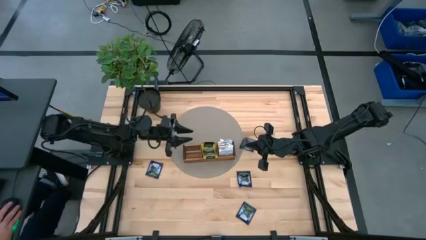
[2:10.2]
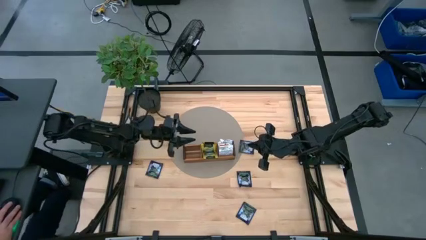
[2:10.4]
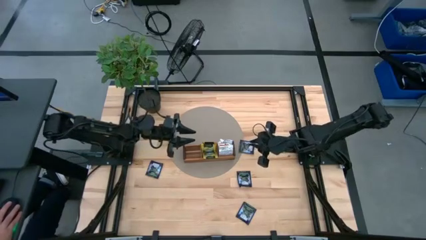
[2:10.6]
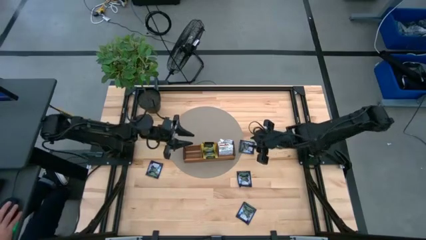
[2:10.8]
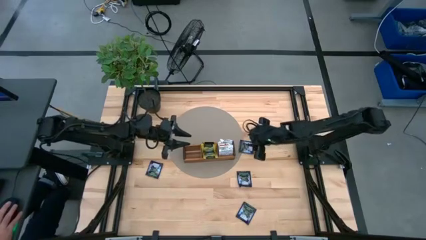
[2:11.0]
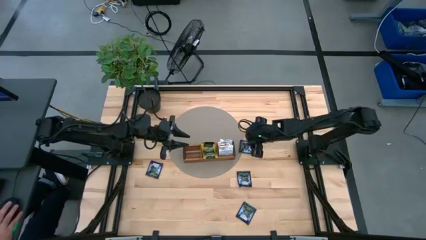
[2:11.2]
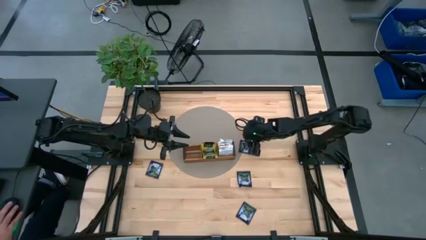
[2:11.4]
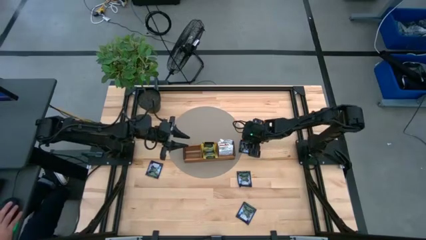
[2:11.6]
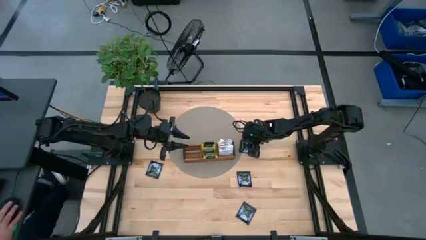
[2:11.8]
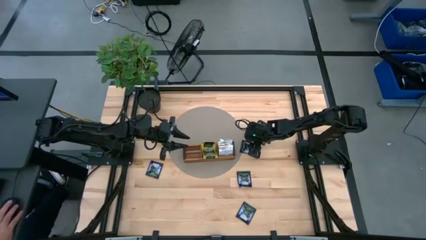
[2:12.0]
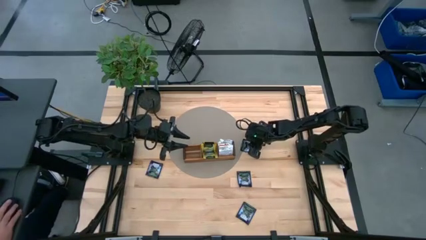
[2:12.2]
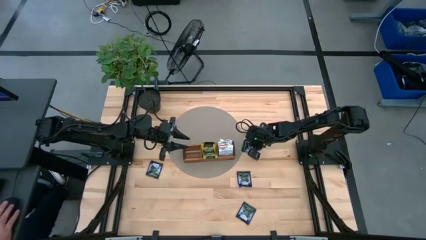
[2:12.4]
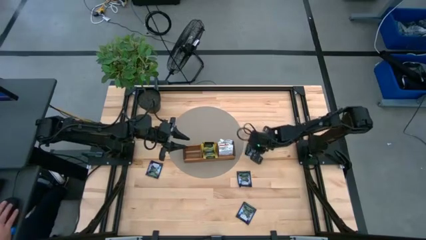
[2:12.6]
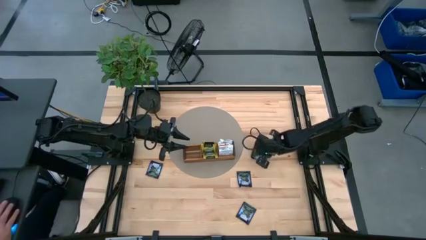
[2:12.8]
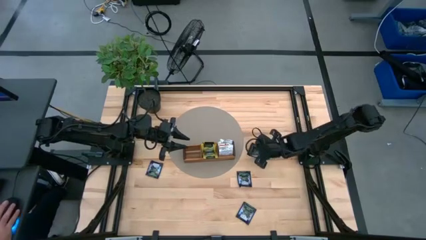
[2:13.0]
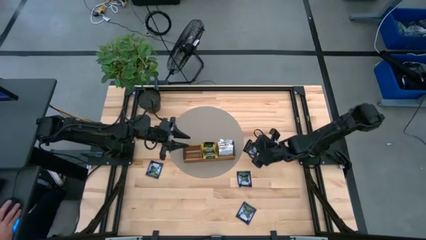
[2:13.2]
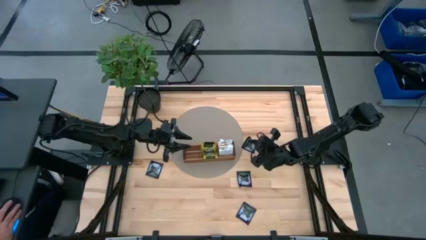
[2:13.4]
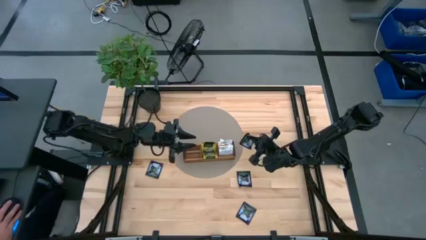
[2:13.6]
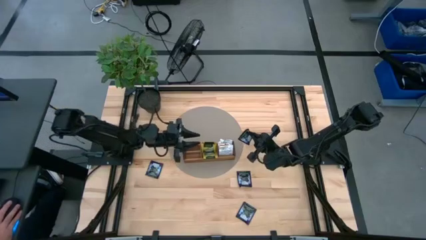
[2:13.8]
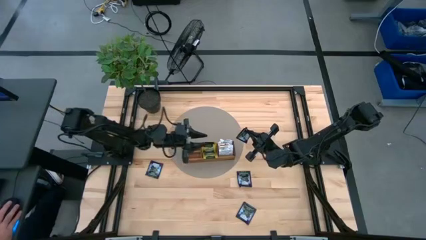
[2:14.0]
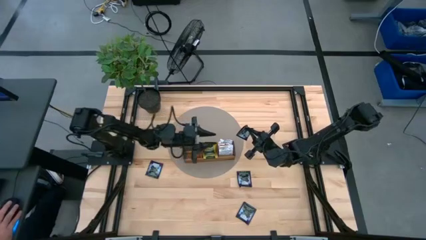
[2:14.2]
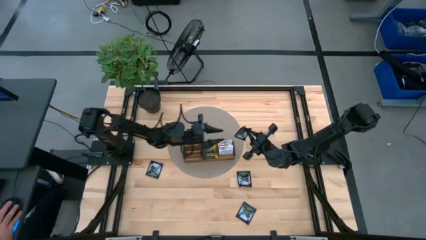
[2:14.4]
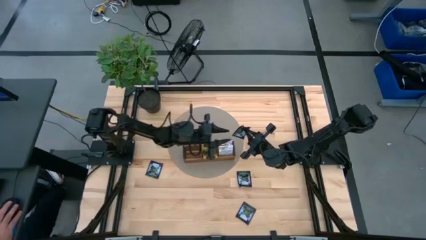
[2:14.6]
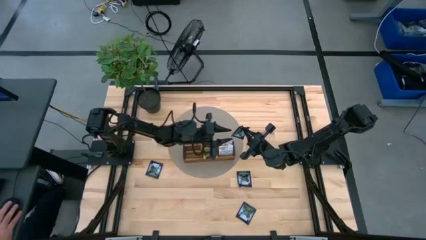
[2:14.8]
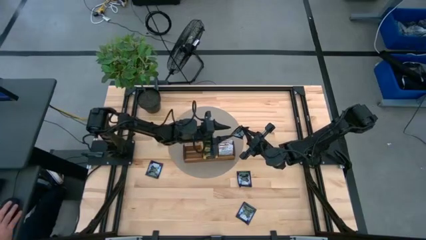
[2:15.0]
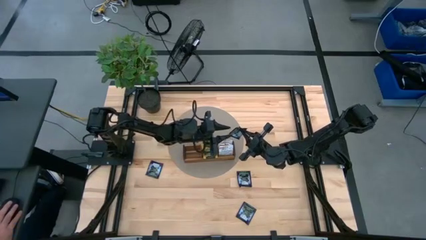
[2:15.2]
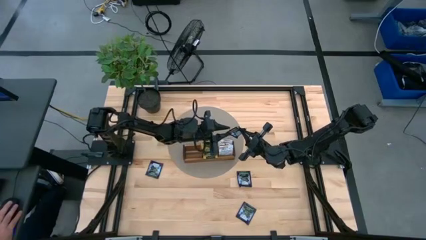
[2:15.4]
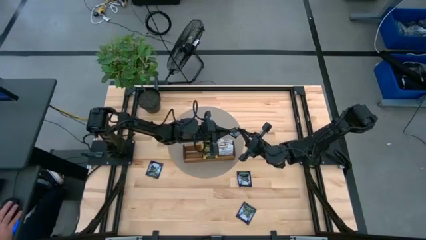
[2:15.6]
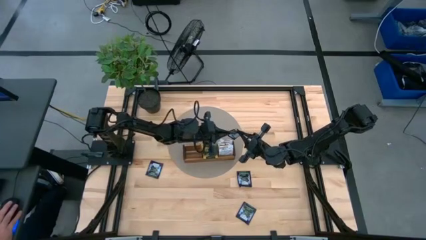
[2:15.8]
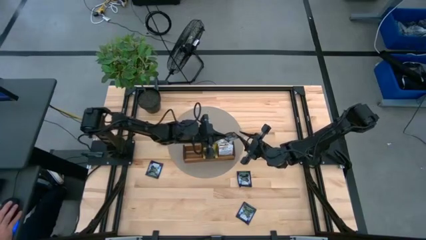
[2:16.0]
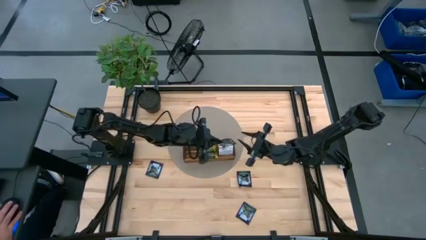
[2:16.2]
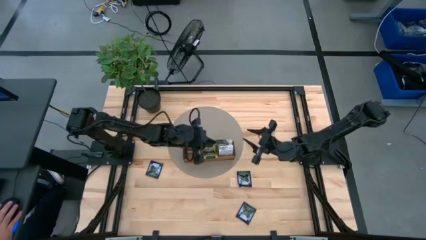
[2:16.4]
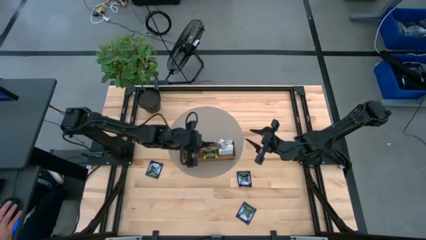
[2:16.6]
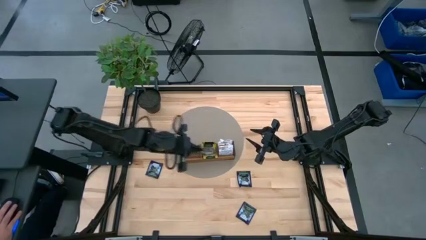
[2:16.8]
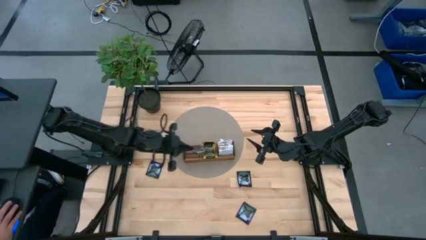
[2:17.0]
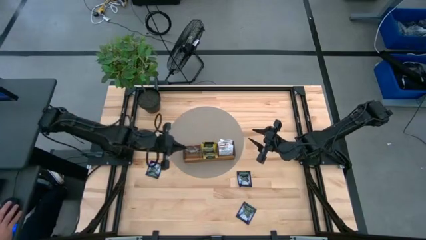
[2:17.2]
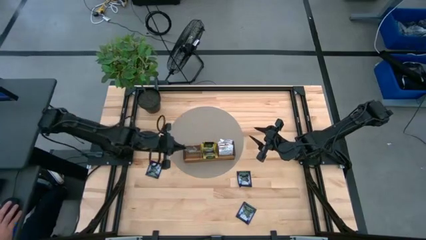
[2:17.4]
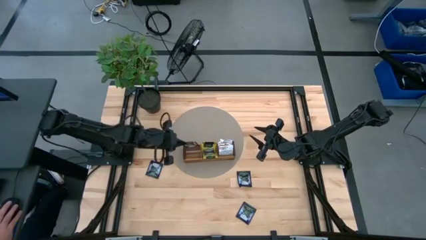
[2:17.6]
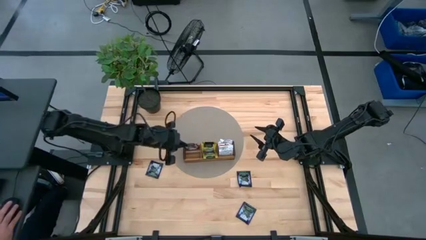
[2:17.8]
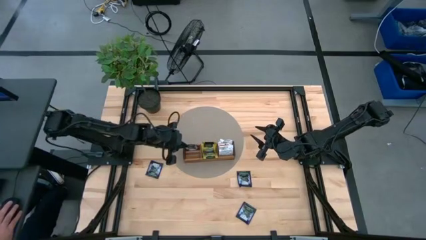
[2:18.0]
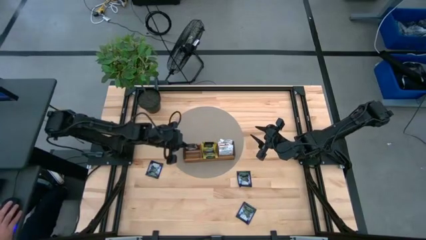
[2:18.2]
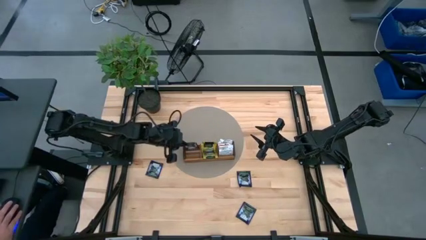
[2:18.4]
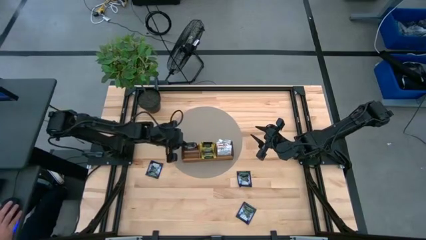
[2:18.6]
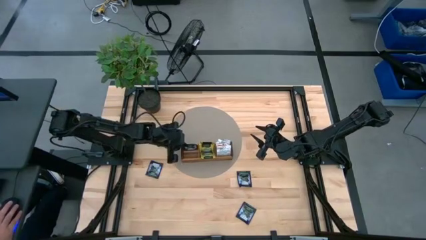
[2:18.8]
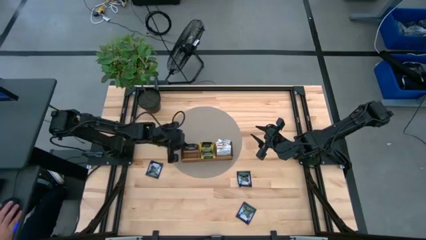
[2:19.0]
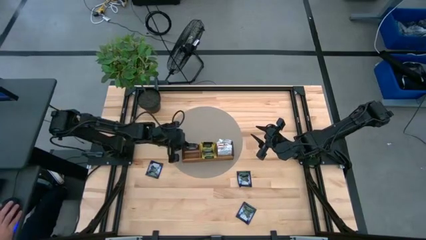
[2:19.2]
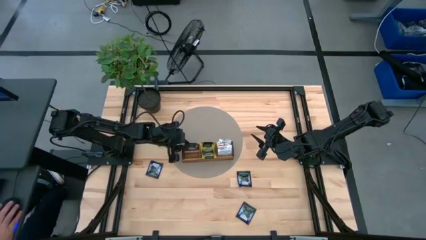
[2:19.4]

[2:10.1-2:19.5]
Task: Pick & Place Tea
Put the purple tea bag into the left section of the wooden organizer

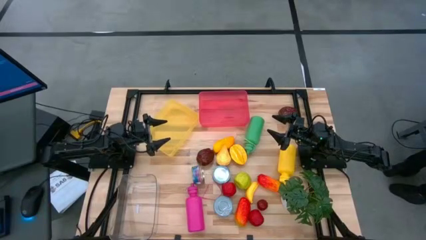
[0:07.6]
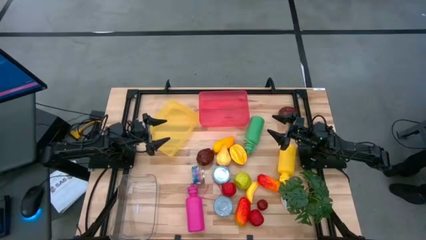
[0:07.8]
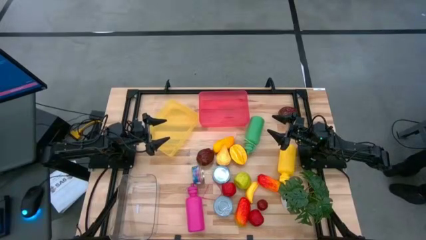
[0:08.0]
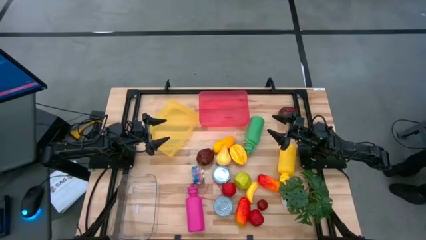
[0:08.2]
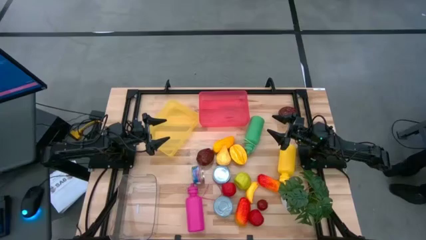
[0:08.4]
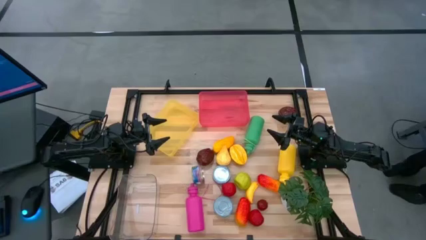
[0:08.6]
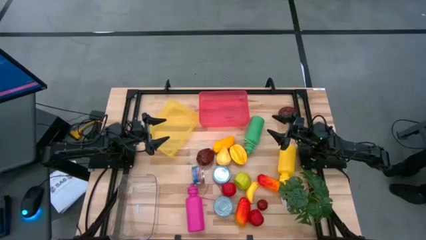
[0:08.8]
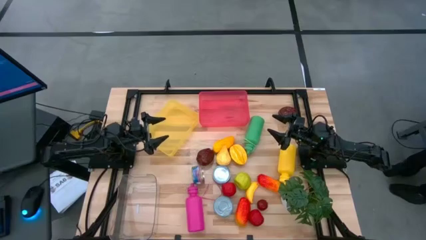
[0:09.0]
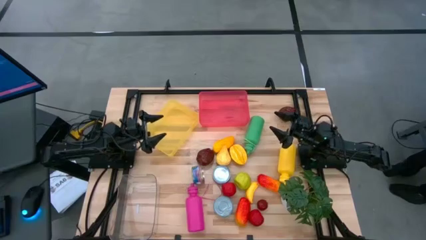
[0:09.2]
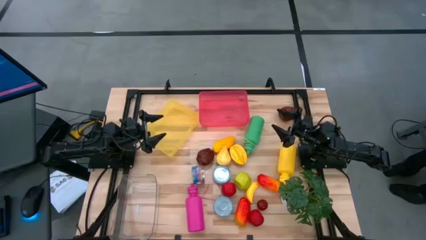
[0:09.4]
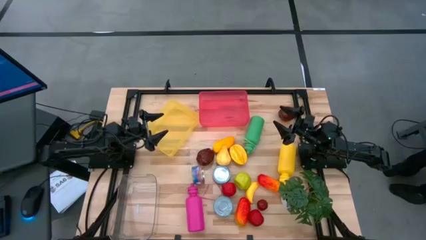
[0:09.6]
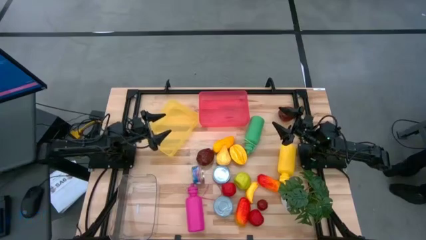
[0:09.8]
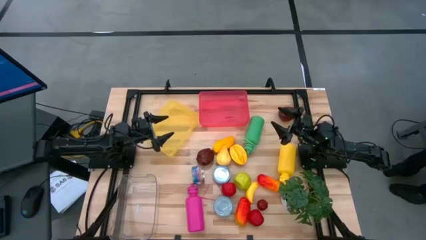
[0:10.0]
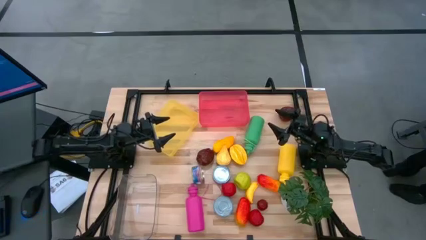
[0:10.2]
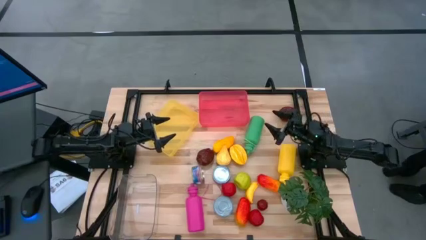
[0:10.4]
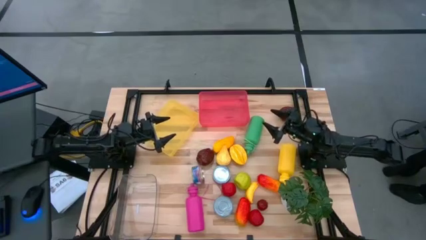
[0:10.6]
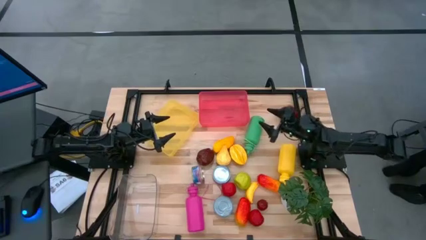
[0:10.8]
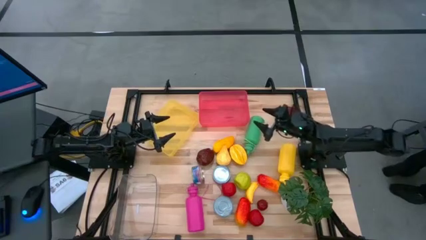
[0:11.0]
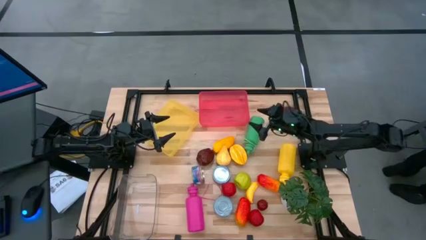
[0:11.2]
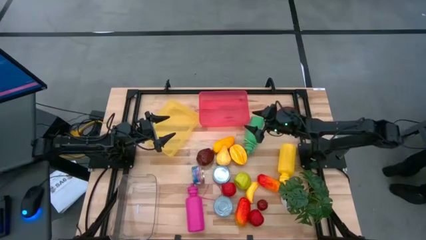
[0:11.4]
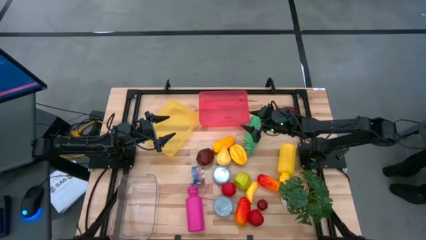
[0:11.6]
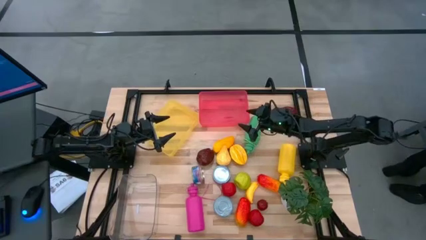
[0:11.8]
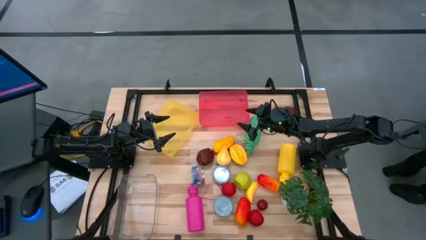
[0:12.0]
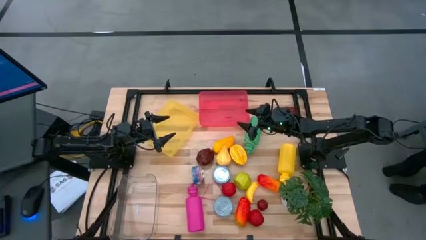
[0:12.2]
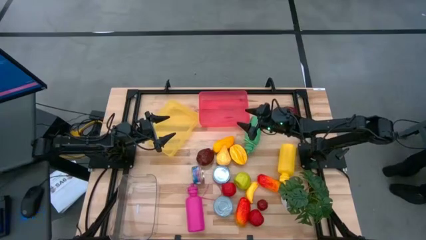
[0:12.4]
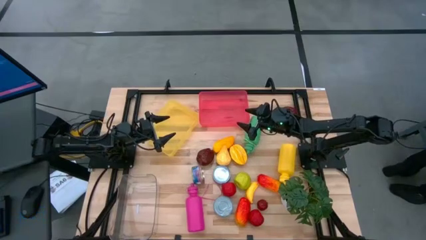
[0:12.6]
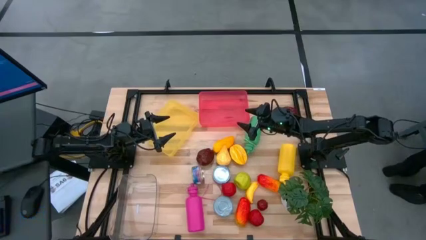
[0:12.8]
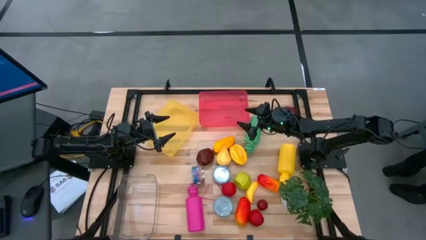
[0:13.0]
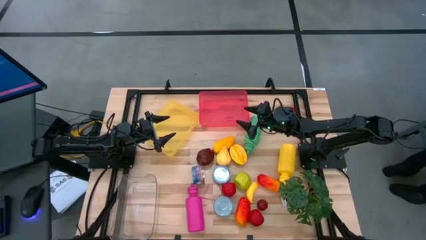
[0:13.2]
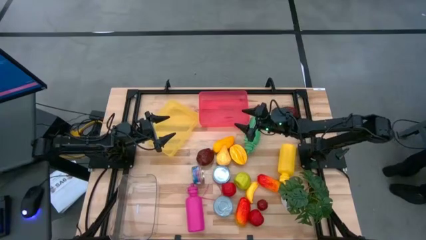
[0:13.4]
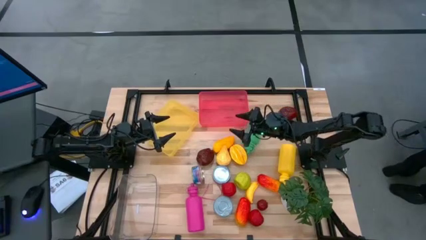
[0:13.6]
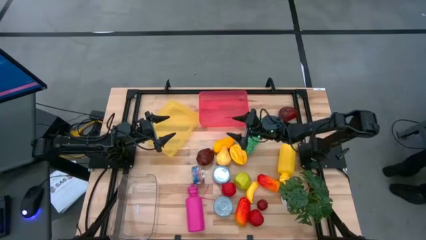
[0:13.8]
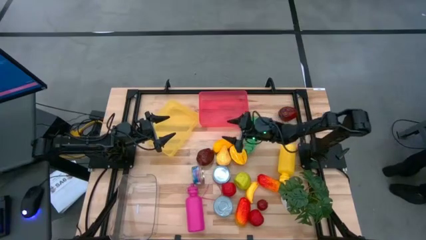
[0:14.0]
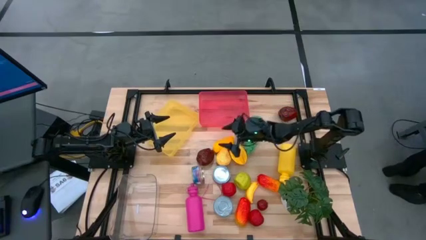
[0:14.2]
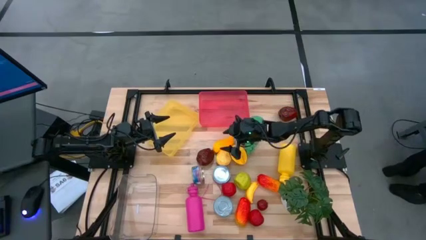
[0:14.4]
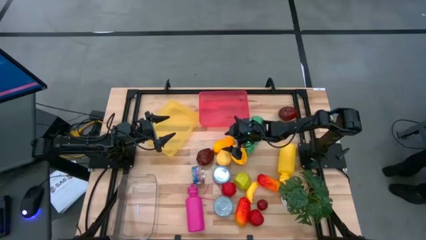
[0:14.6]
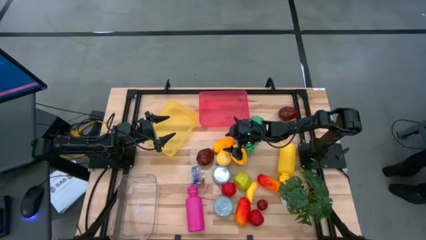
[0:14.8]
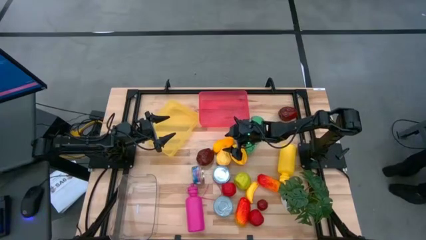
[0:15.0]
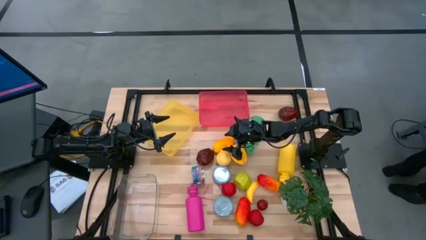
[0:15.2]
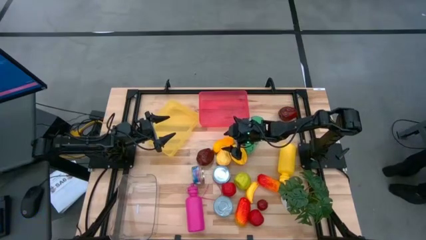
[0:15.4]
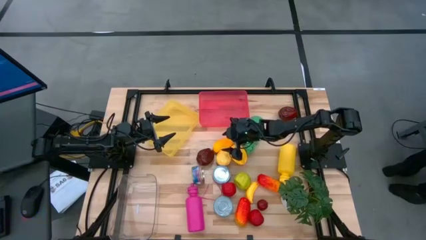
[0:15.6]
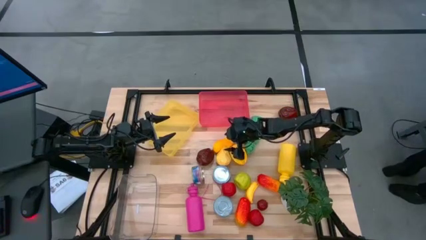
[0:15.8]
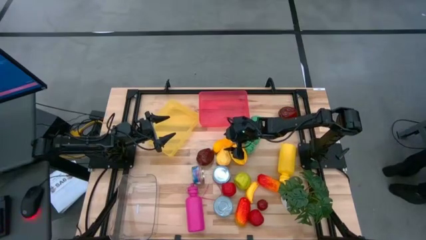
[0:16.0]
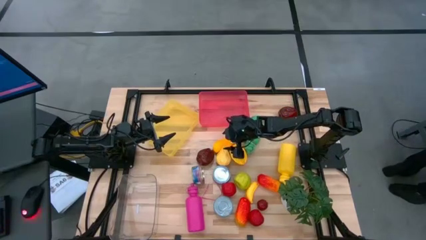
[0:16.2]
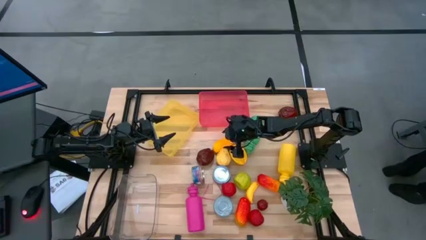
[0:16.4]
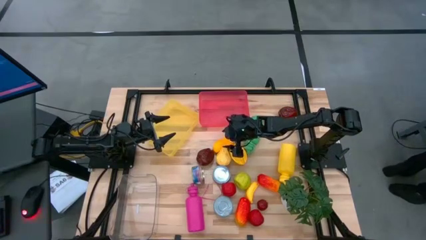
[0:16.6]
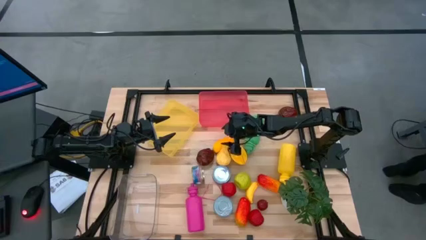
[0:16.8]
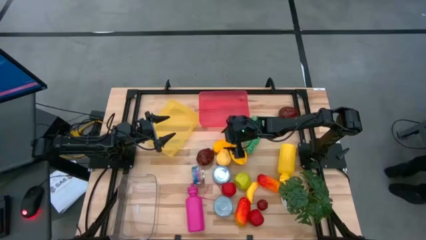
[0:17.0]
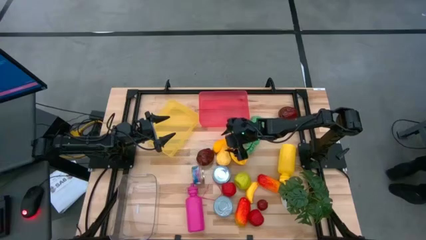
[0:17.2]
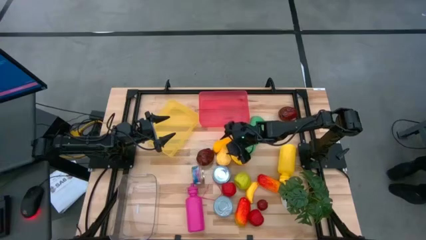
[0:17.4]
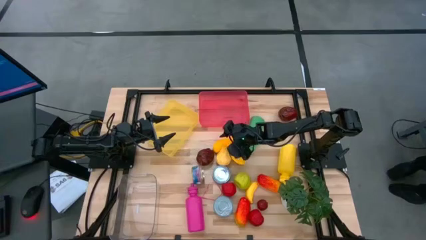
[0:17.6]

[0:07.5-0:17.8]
Task: Pick & Place Food Item
Put the starfruit into the pink bin
